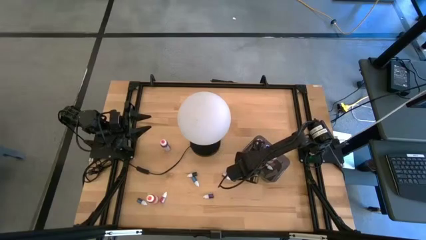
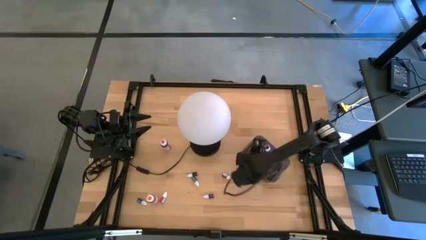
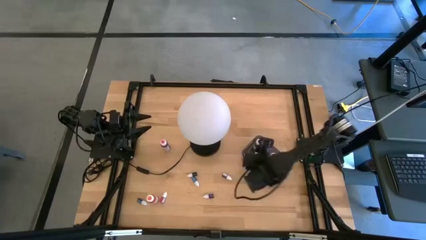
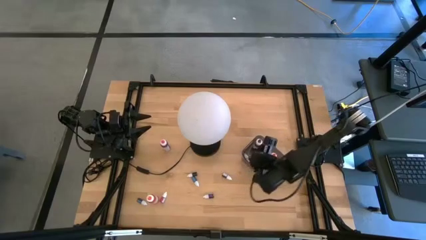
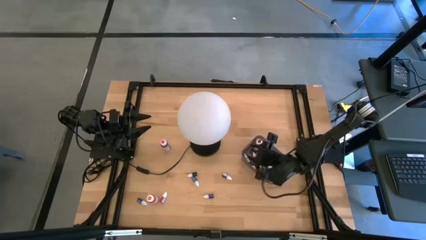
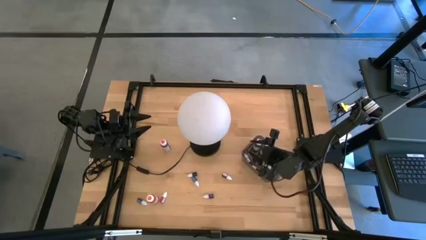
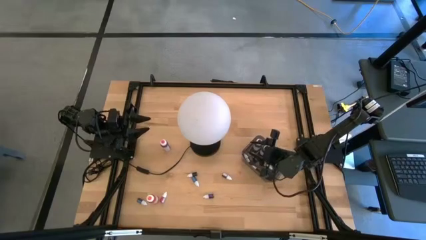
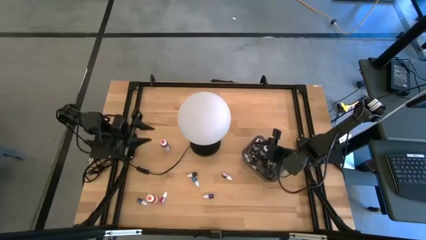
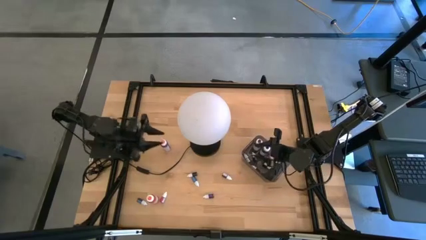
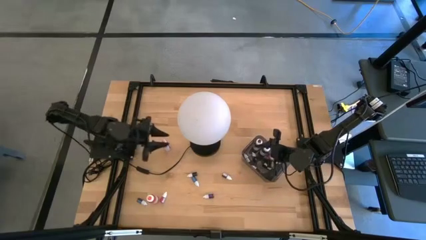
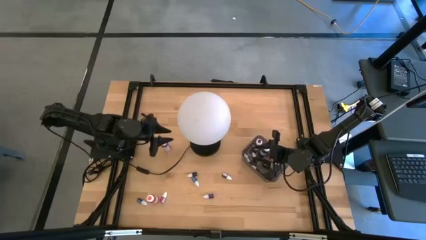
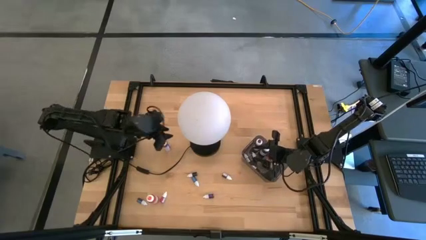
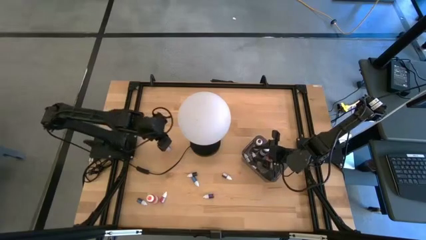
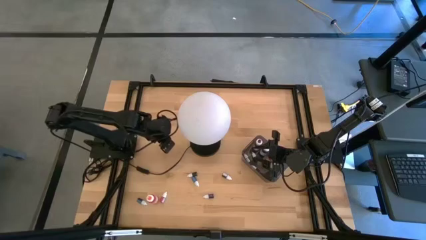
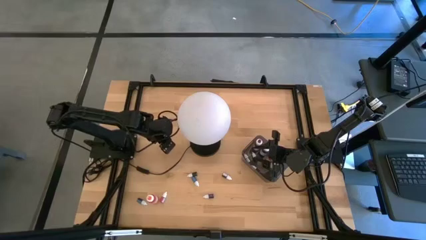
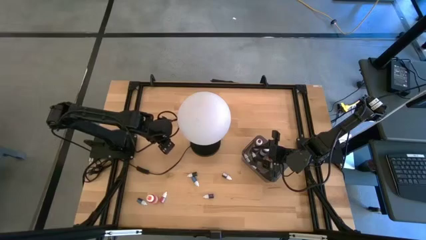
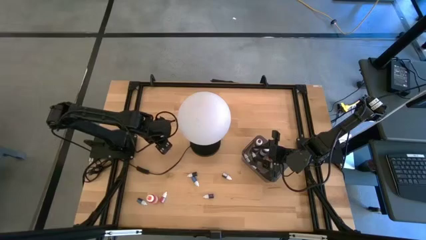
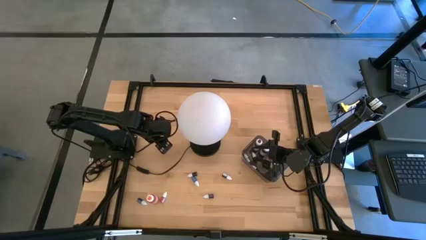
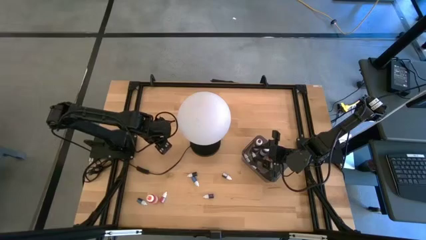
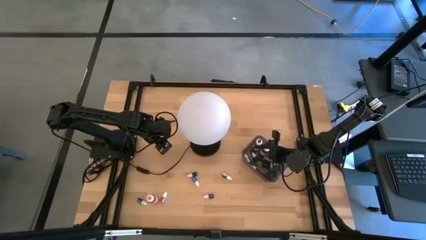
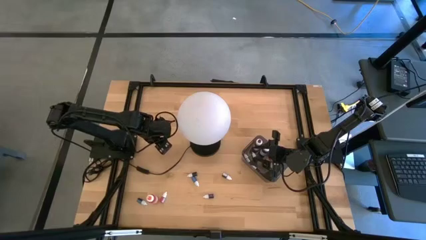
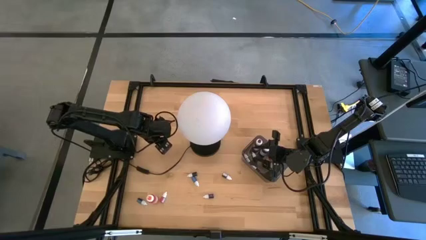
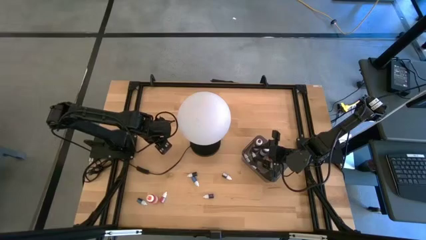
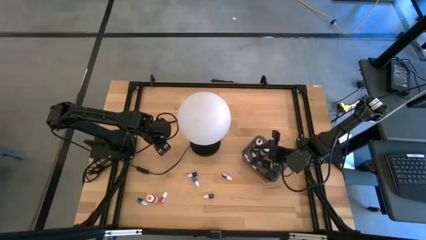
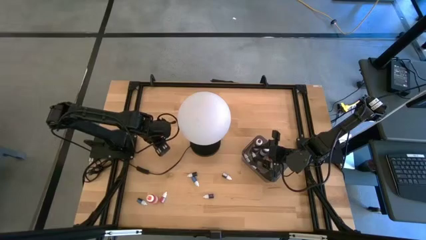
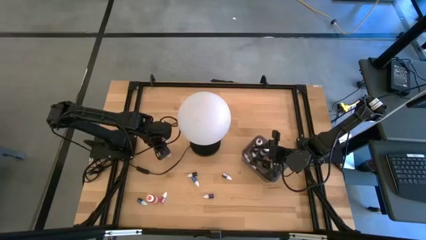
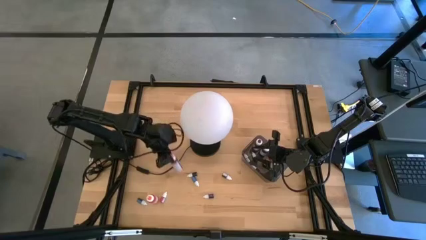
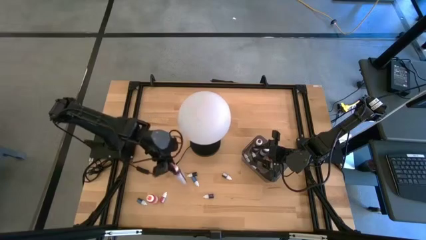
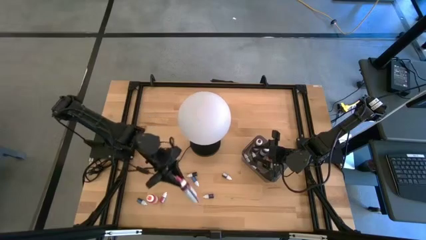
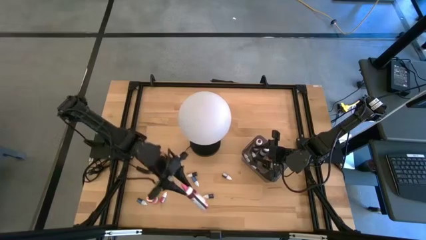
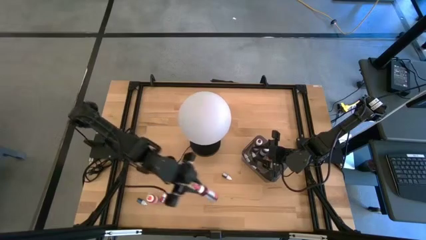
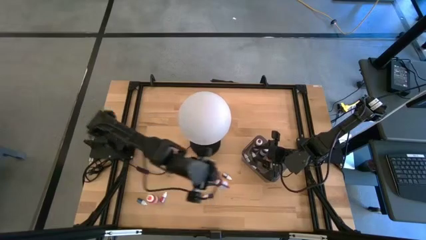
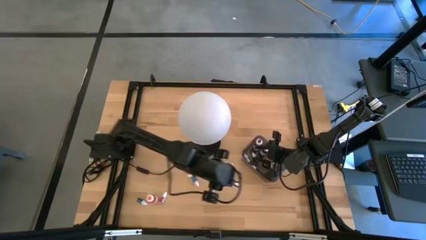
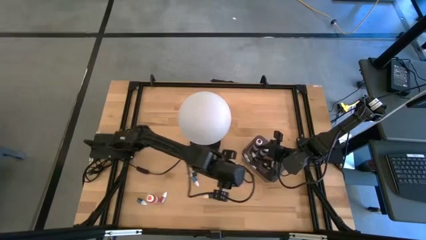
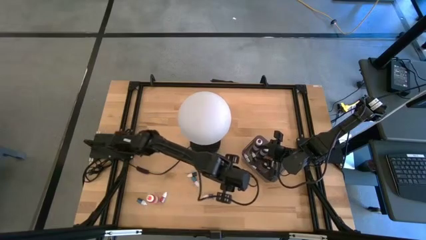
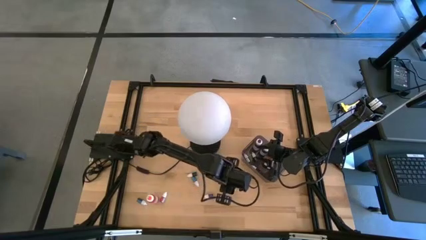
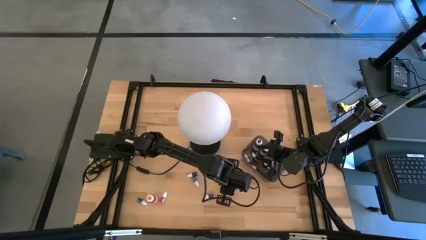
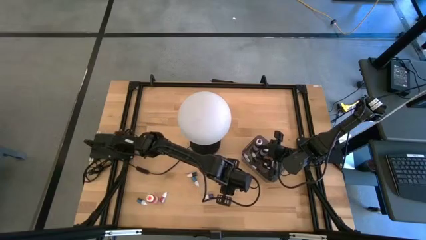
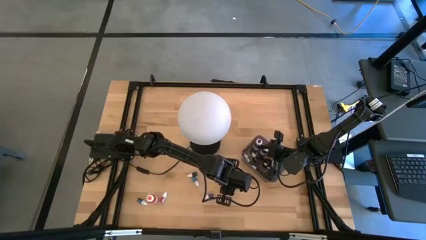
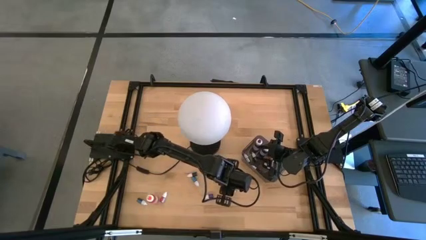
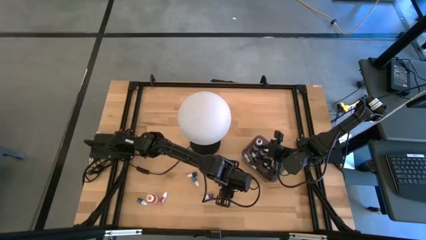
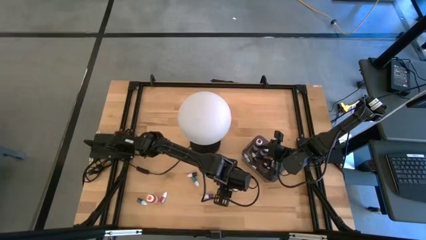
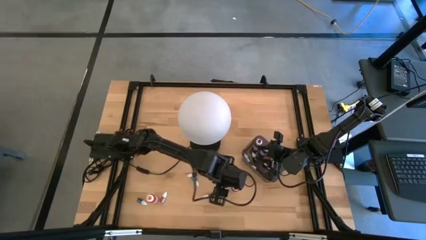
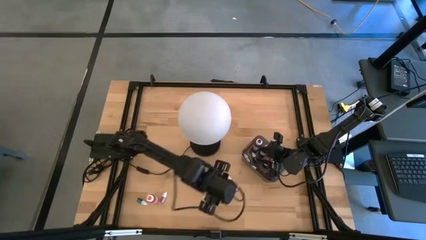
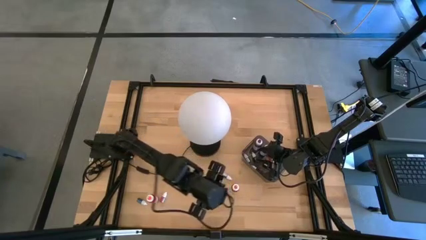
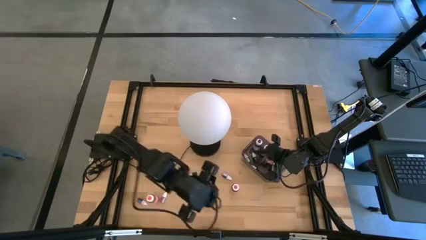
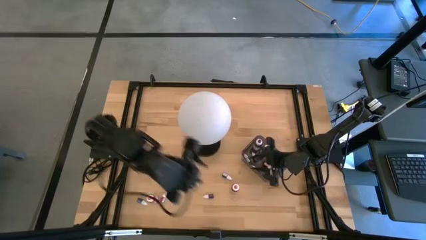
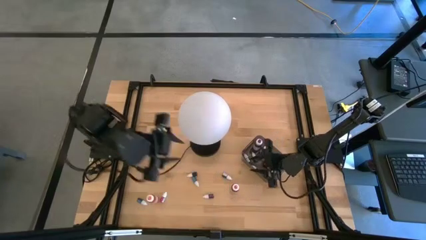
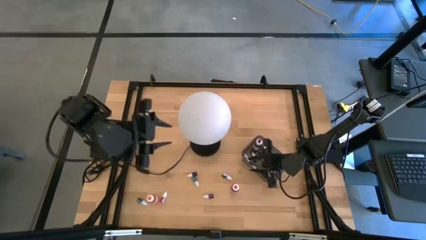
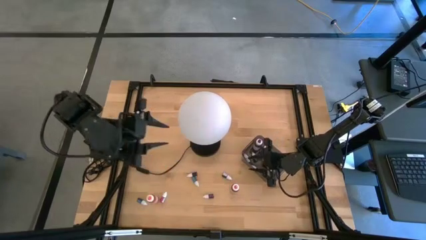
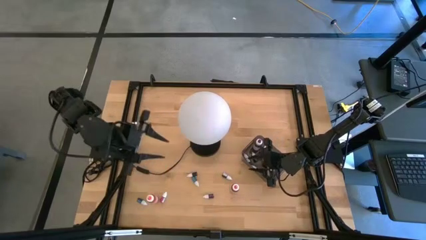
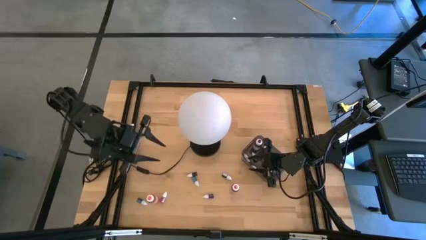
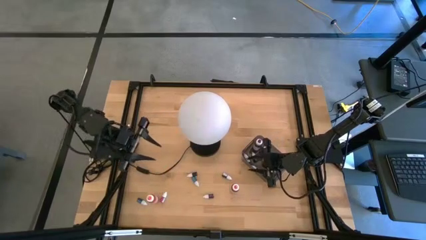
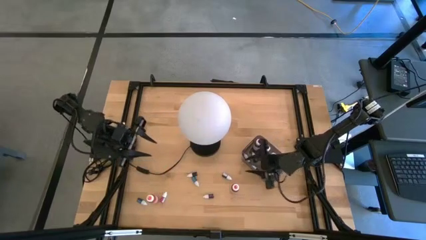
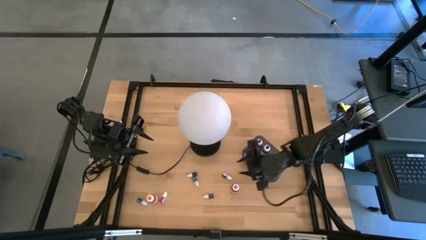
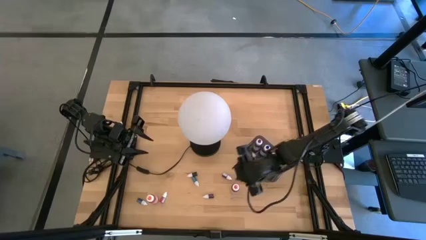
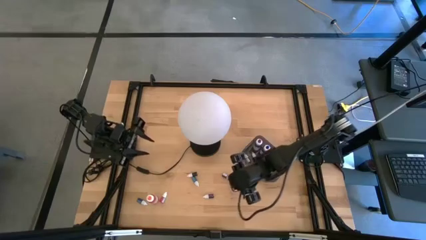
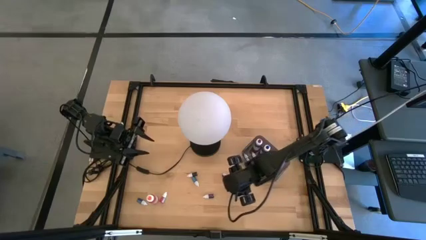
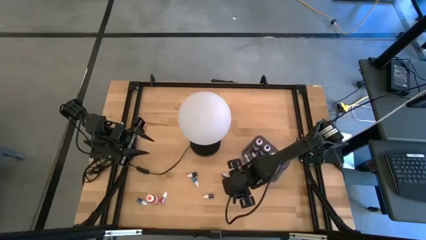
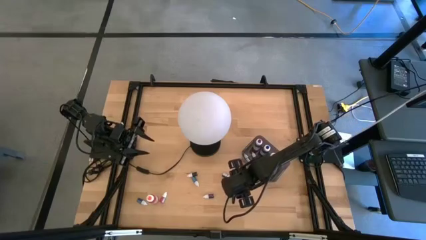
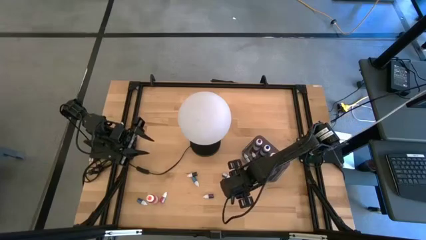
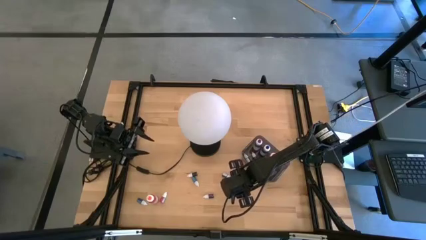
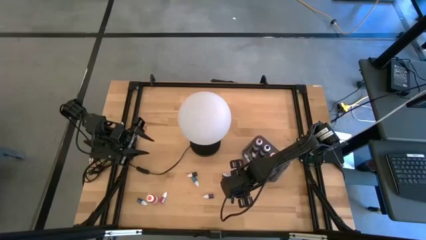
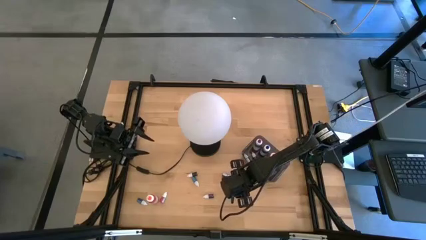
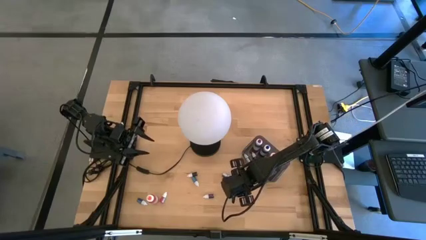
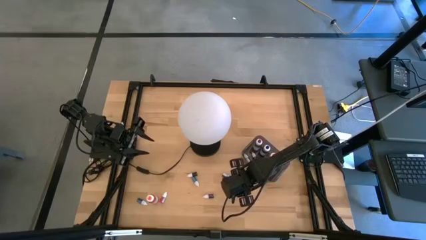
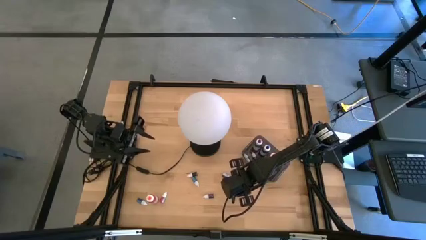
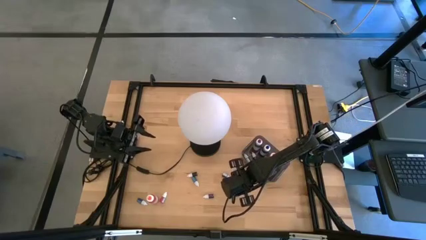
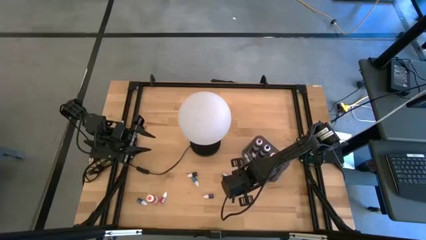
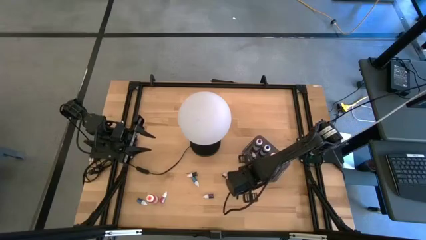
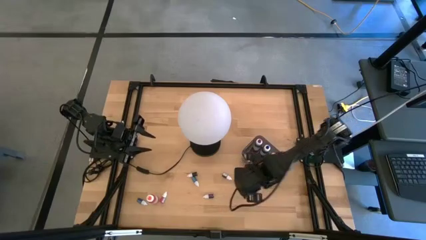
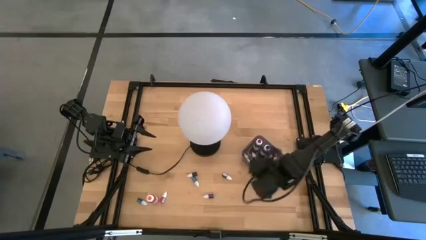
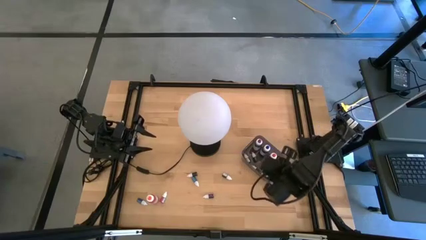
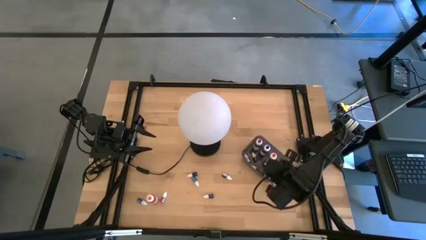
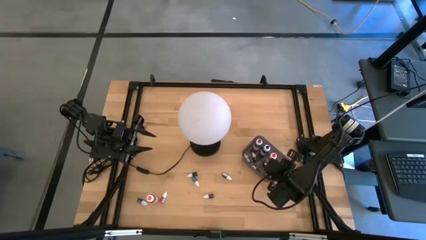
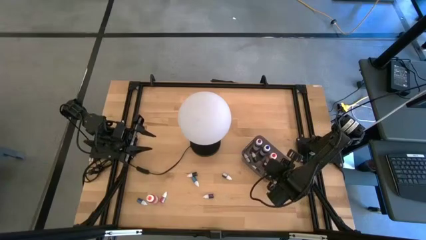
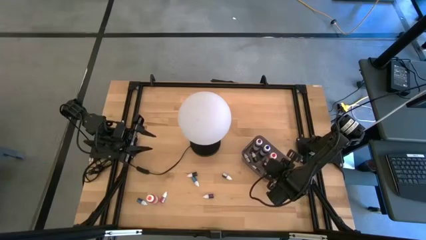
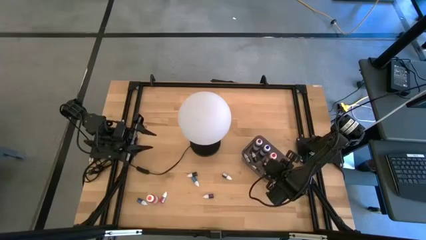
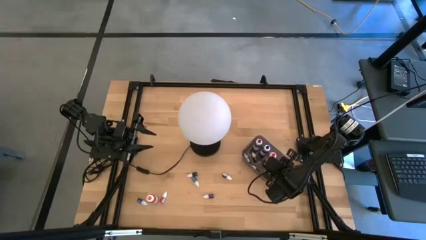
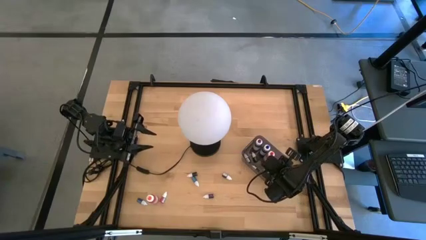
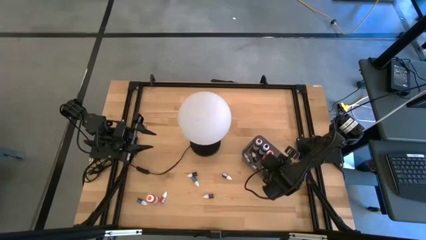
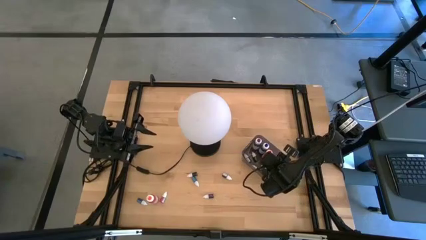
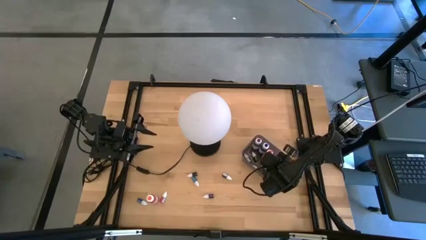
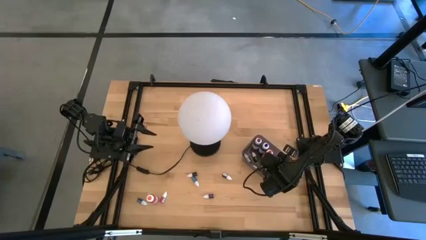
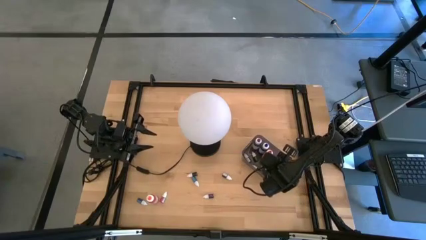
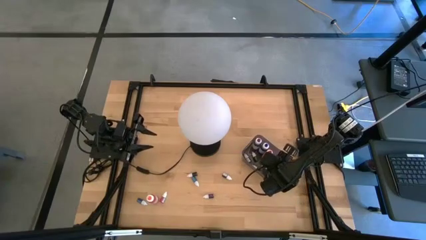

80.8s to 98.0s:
Task: Pick & Place food coloring
Put the large pink food coloring bottle into the black container
